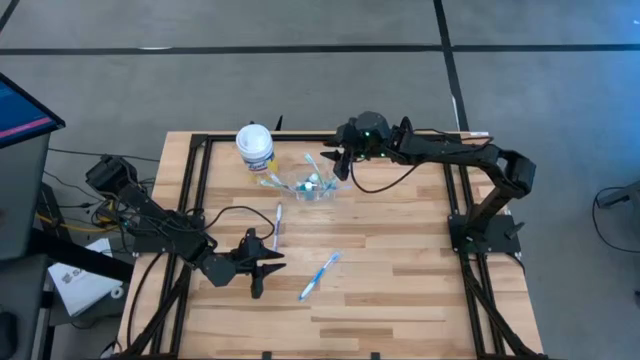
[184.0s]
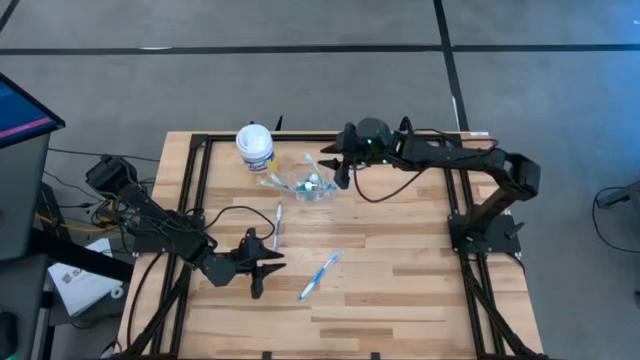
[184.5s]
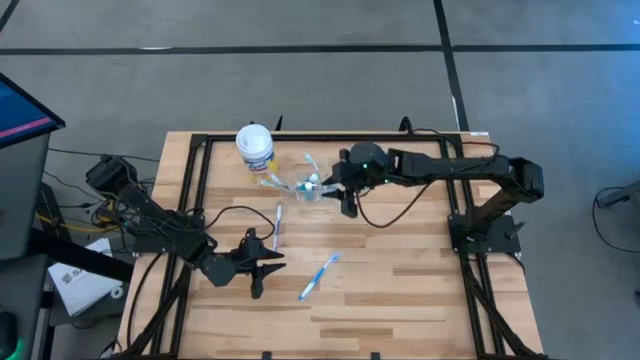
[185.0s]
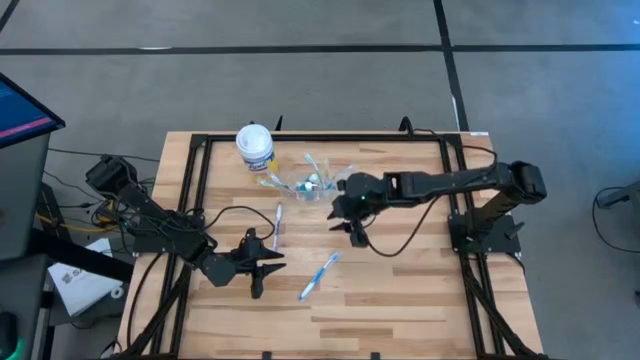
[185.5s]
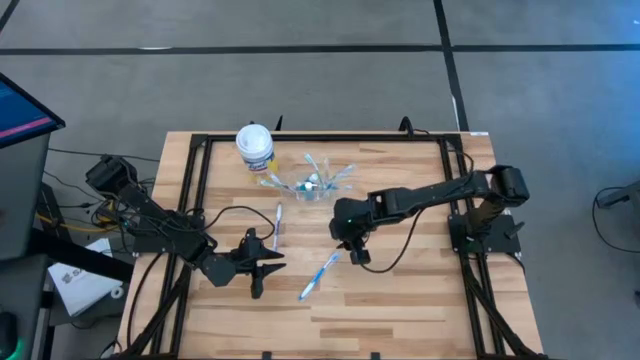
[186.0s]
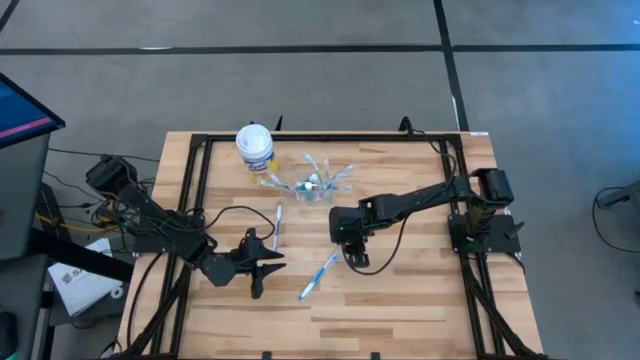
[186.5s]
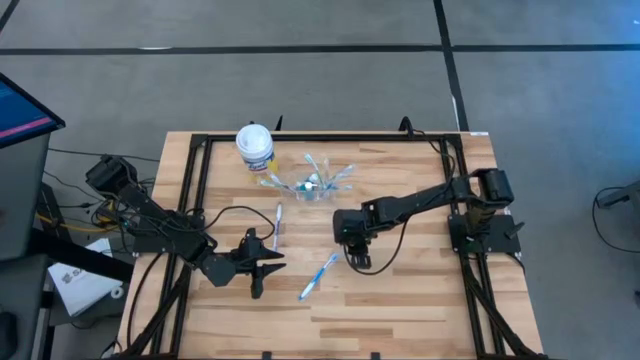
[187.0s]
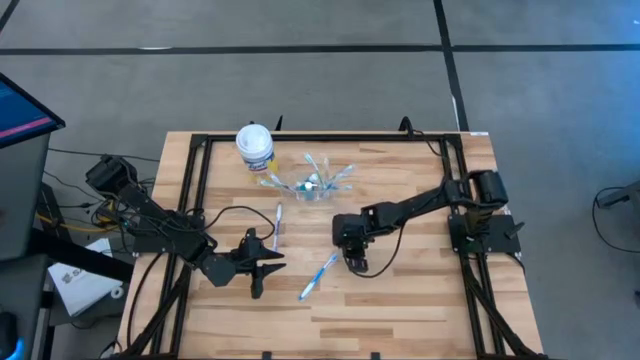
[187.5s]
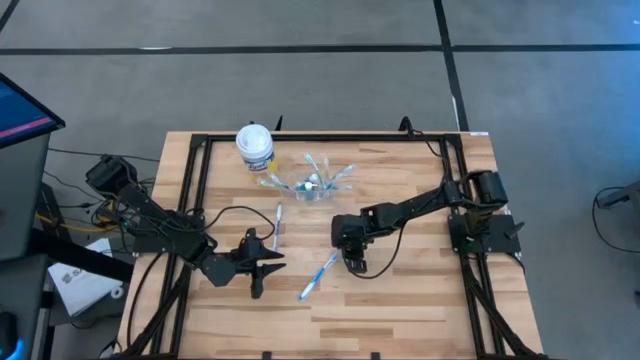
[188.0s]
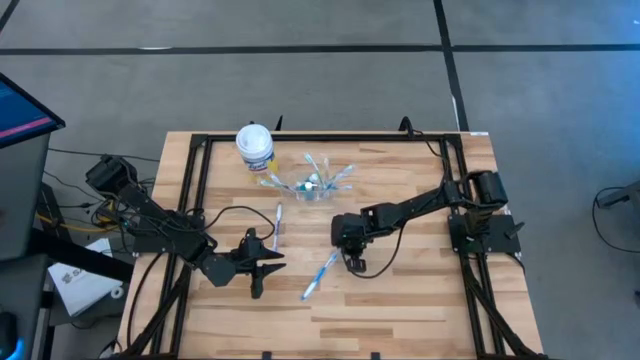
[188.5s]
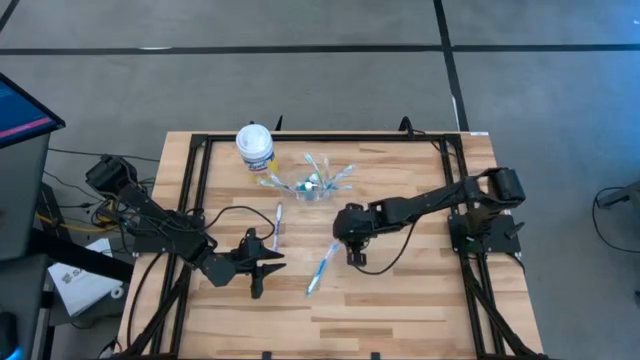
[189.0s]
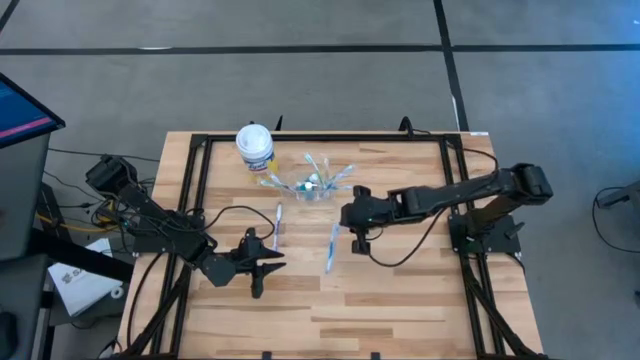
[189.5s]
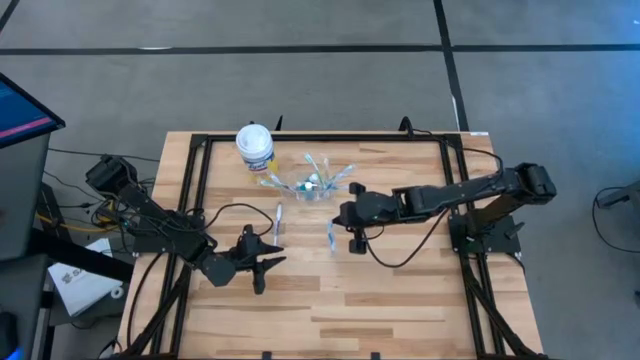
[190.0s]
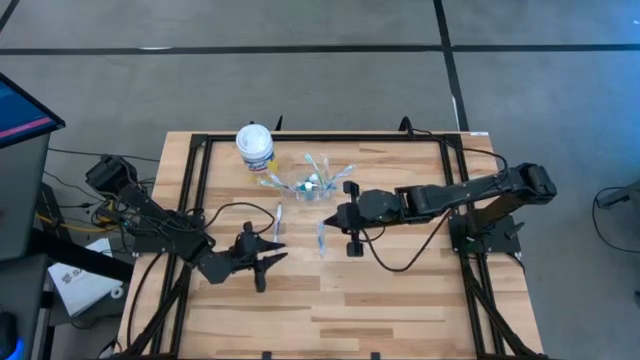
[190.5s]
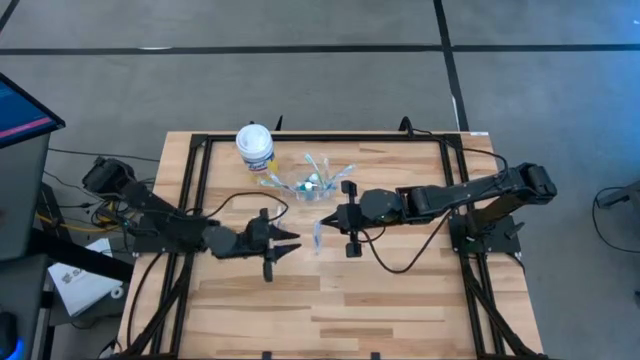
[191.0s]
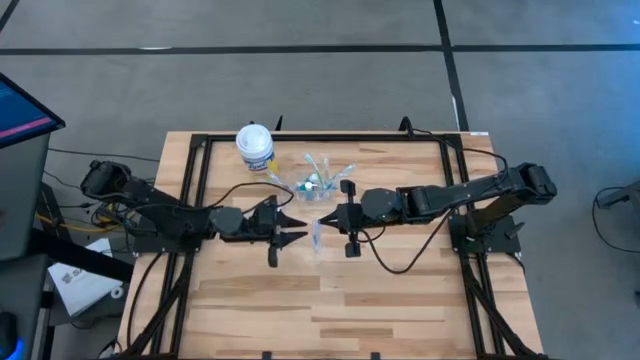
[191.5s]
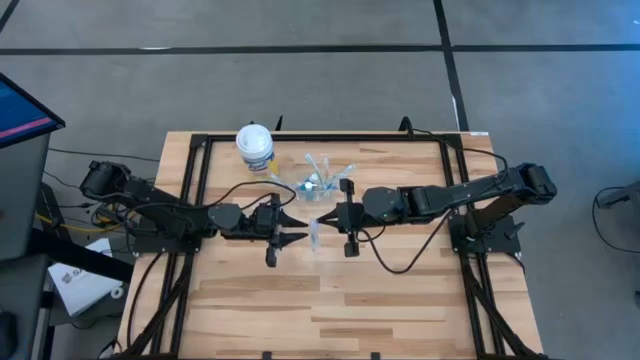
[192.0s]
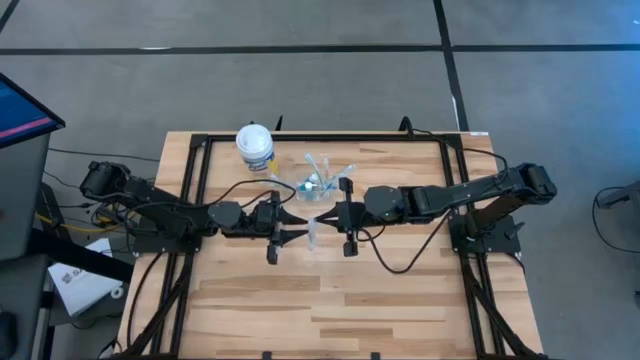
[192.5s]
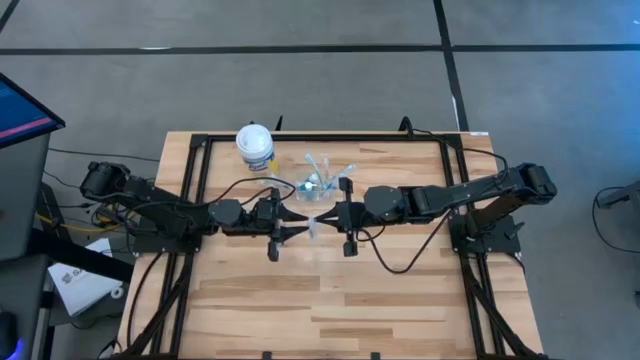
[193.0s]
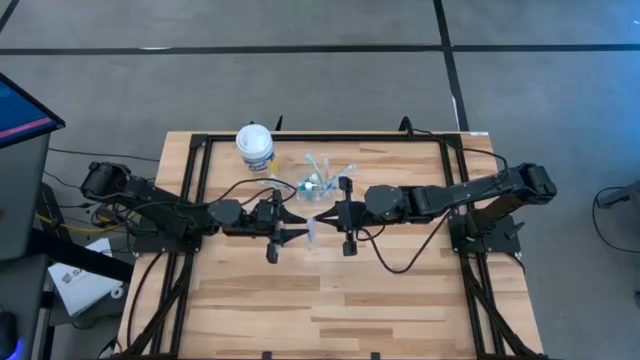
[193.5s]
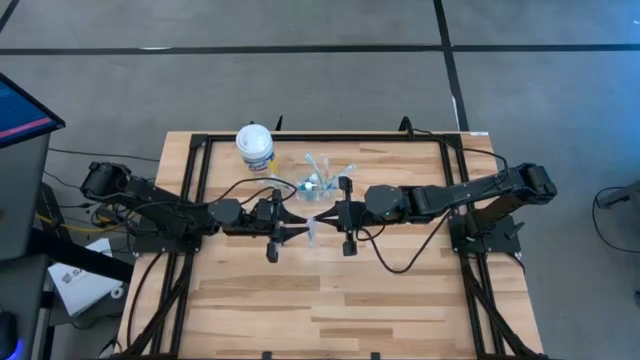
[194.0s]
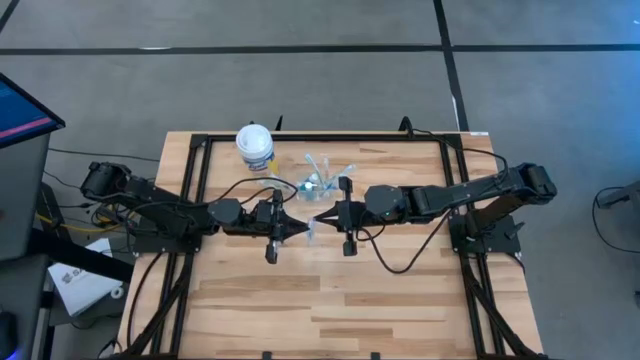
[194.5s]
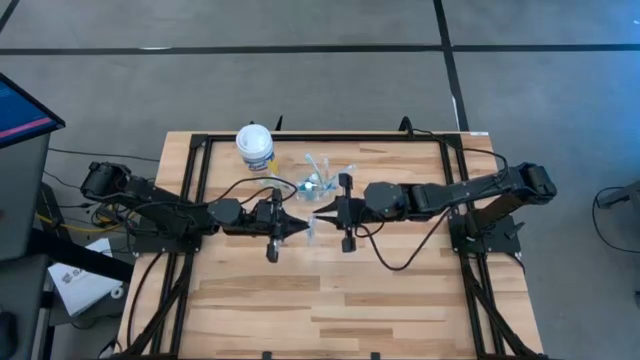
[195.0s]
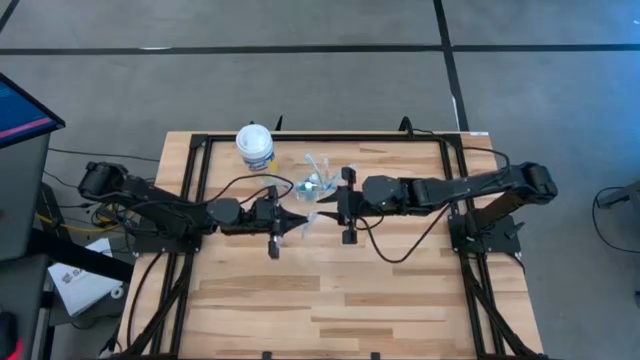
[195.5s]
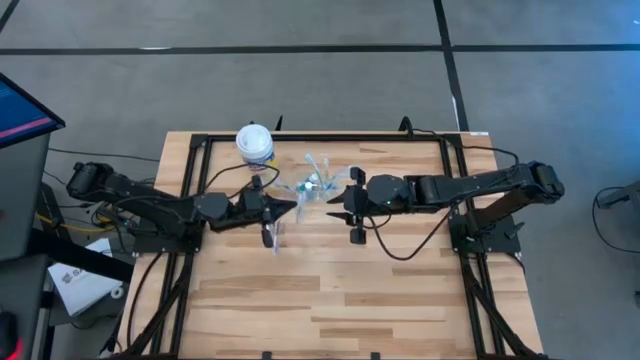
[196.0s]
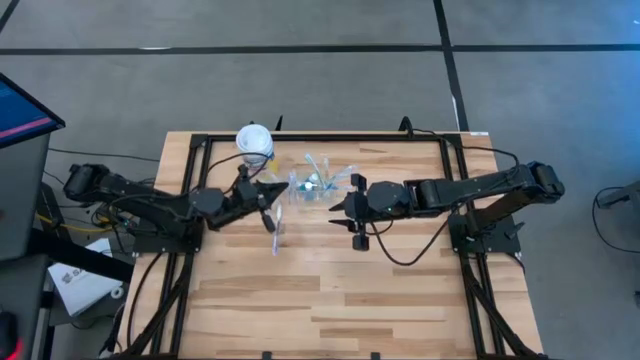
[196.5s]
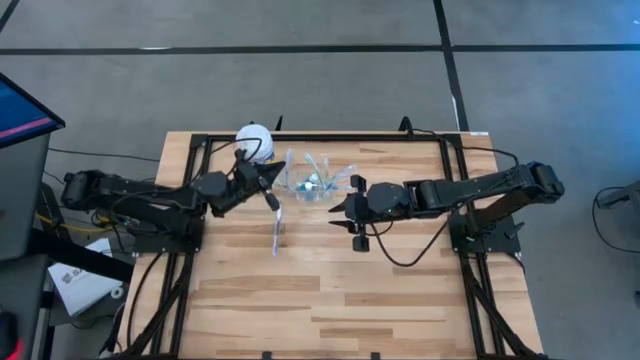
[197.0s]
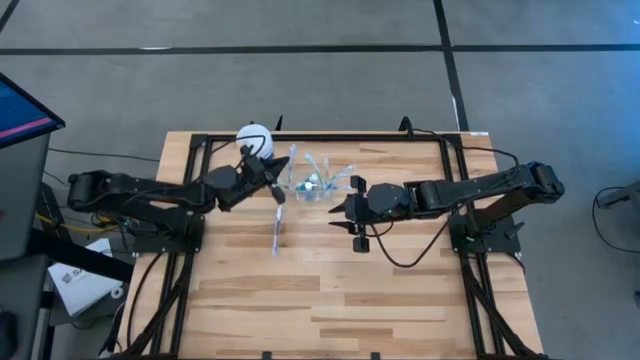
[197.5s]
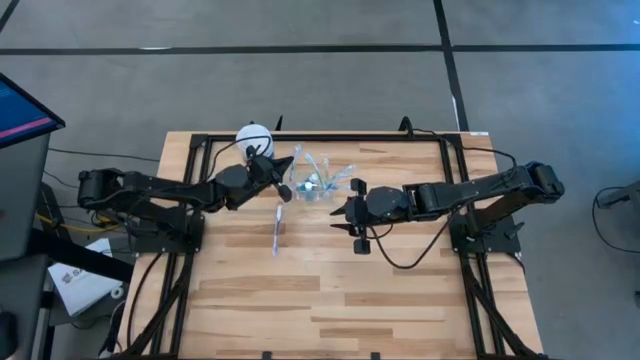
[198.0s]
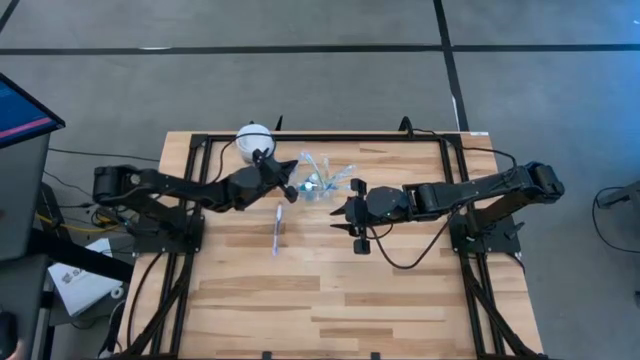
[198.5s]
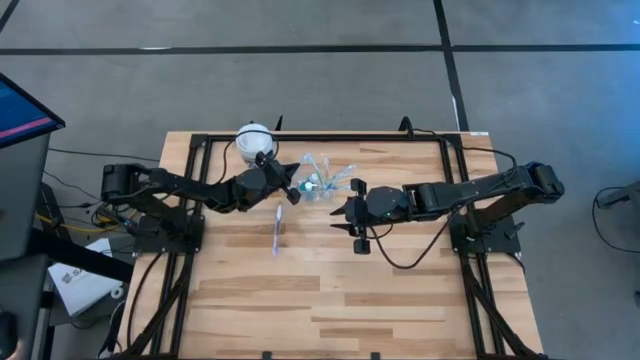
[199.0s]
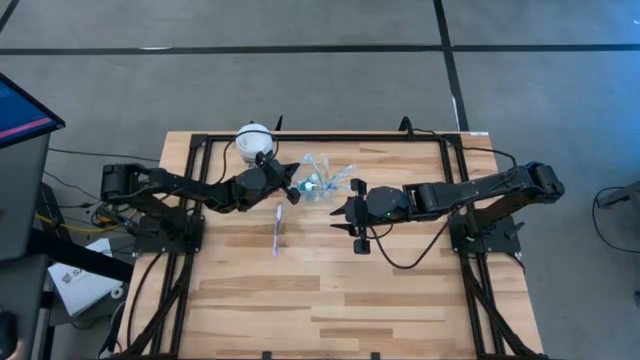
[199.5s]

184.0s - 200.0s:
Task: Pick & Place toothbrushing station
Put the blue toothbrush into the transparent organizer

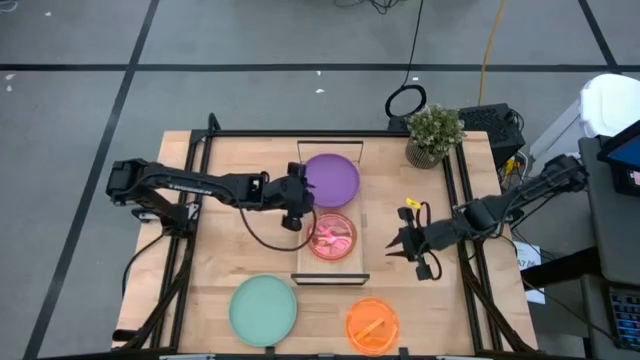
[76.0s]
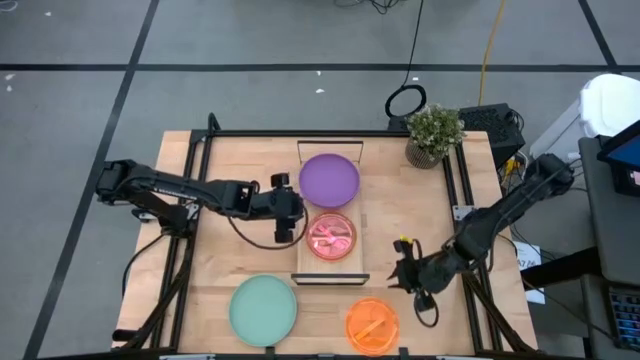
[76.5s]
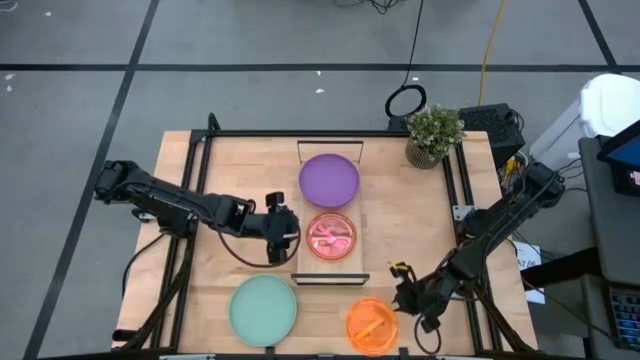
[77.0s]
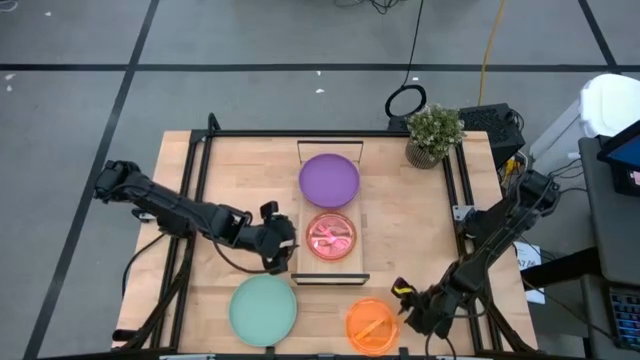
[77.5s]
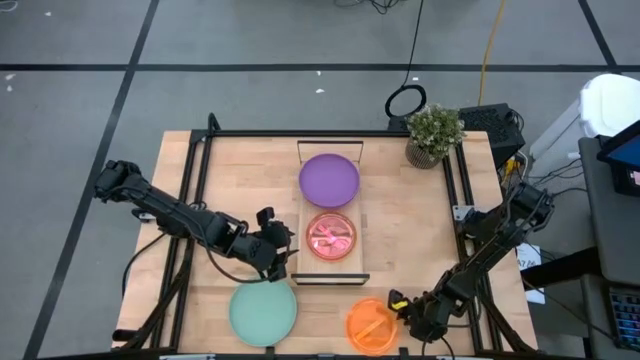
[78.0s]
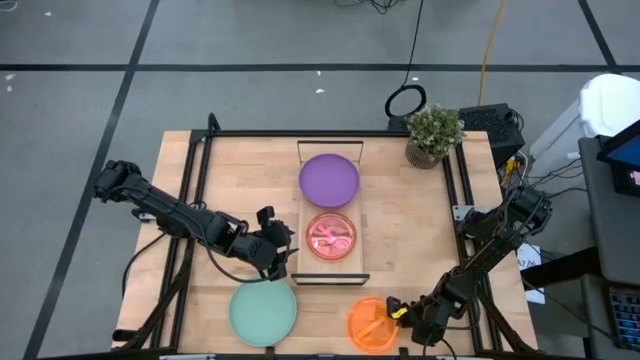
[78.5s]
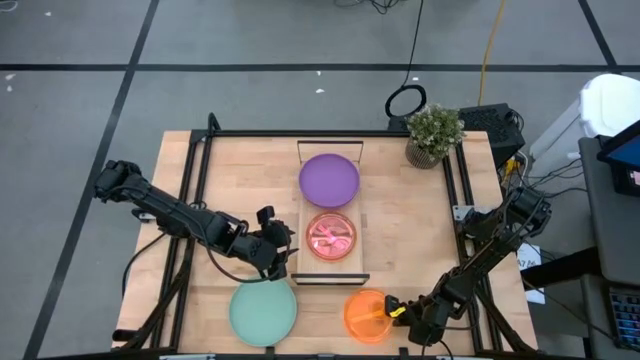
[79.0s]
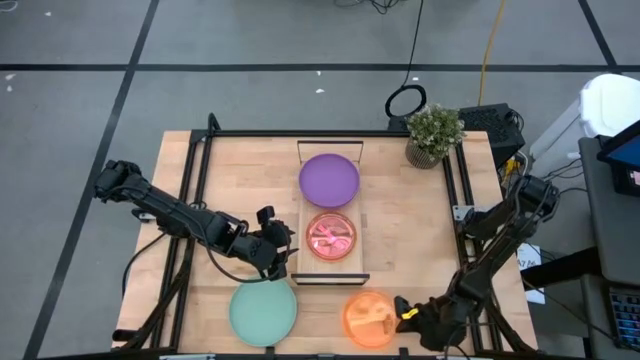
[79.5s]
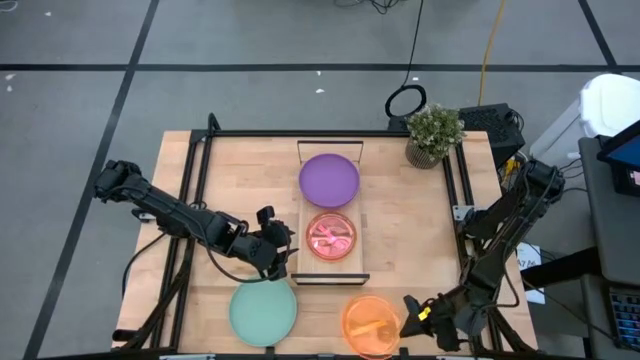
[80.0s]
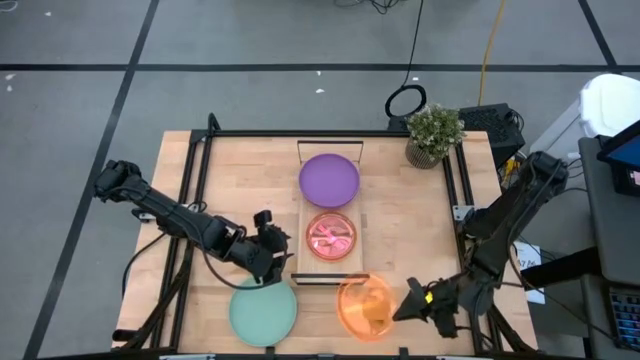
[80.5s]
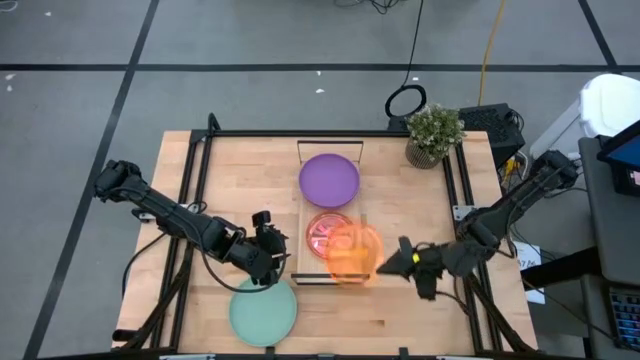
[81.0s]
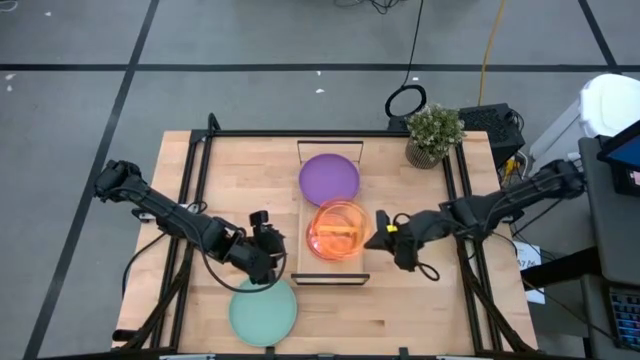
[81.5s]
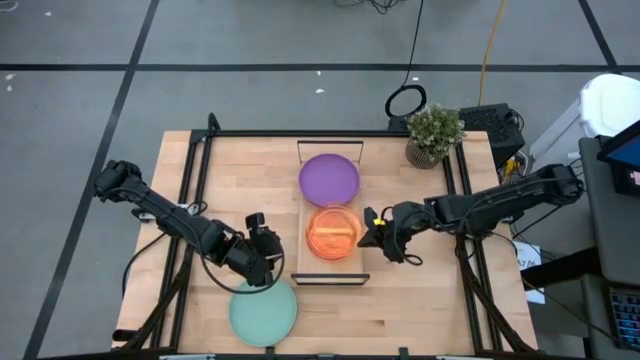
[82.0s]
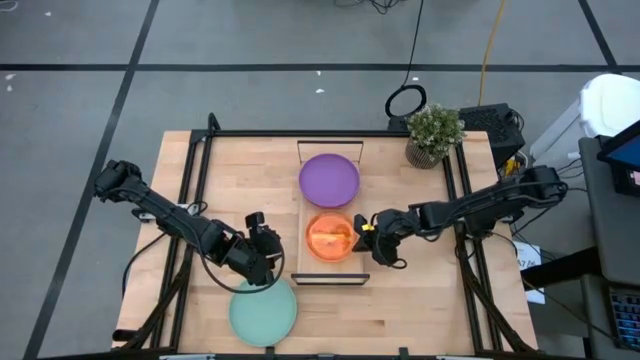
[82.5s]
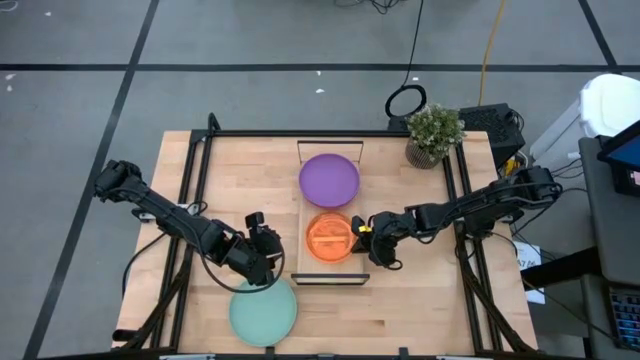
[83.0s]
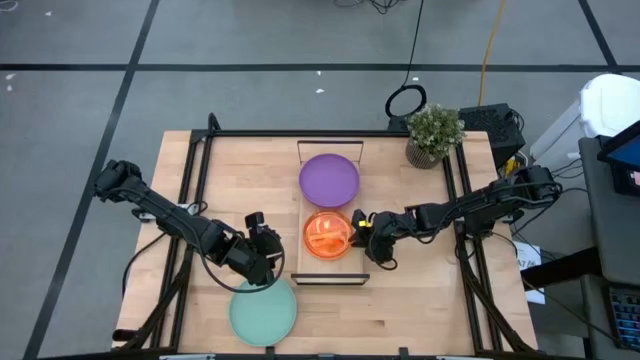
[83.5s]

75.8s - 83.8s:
Task: Place and stack plates onto a shelf
Stack the orange plate on top of the light pink plate on the shelf
